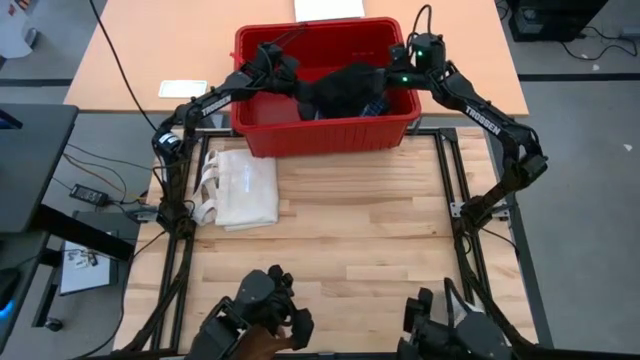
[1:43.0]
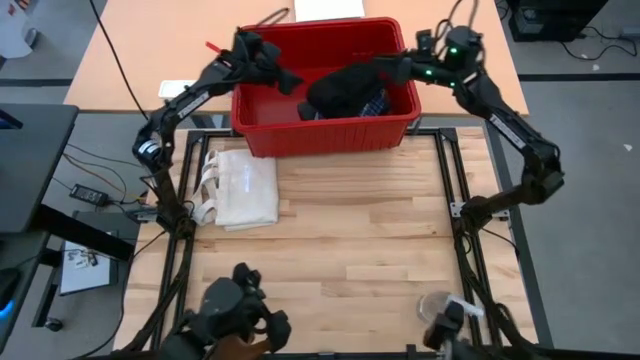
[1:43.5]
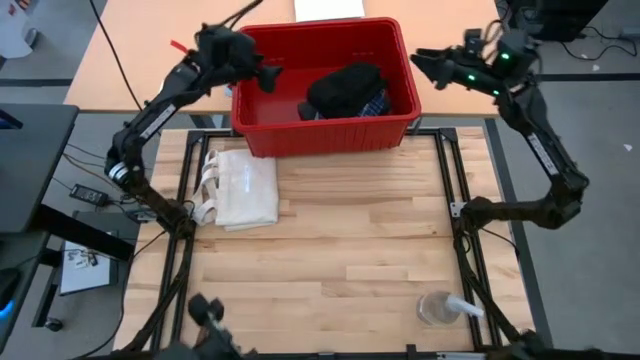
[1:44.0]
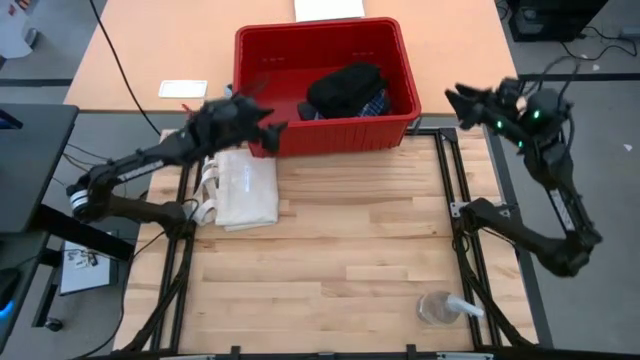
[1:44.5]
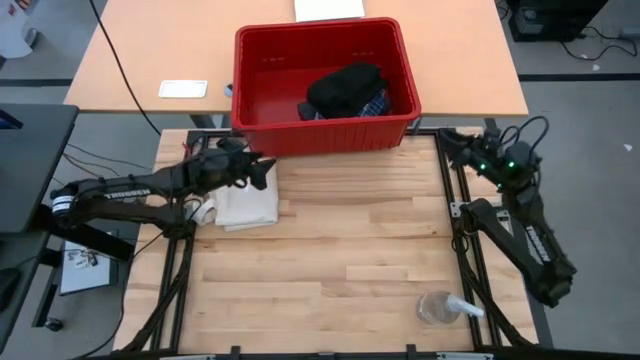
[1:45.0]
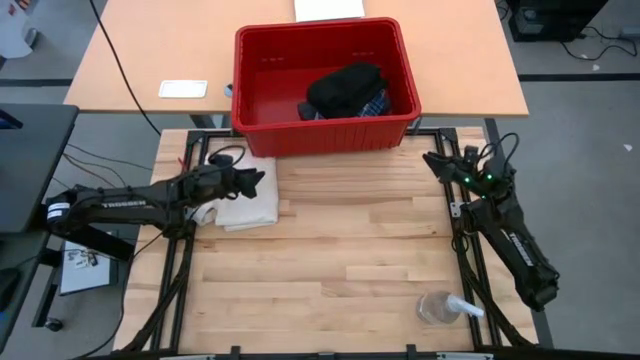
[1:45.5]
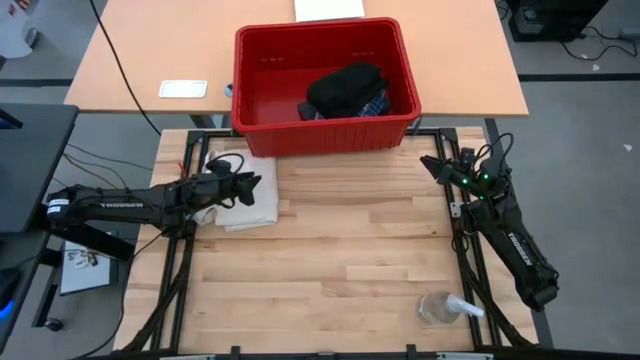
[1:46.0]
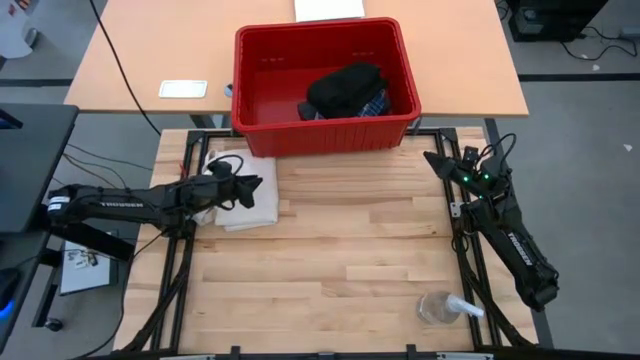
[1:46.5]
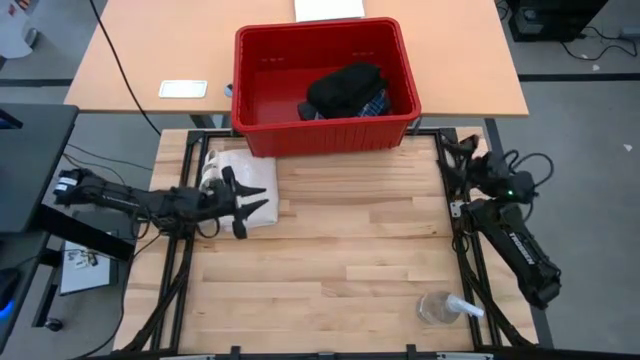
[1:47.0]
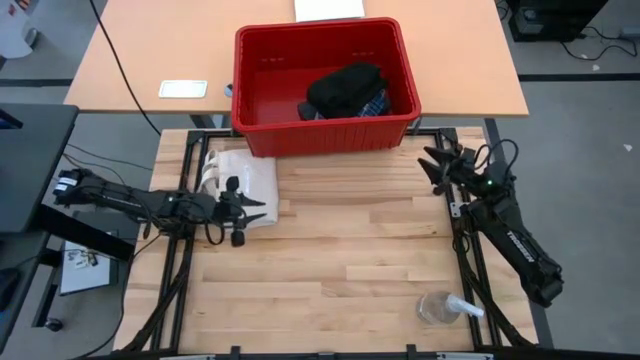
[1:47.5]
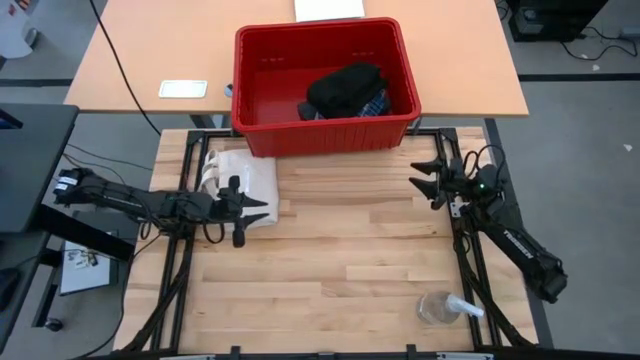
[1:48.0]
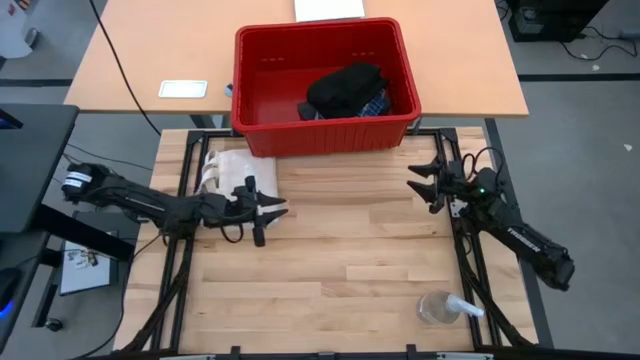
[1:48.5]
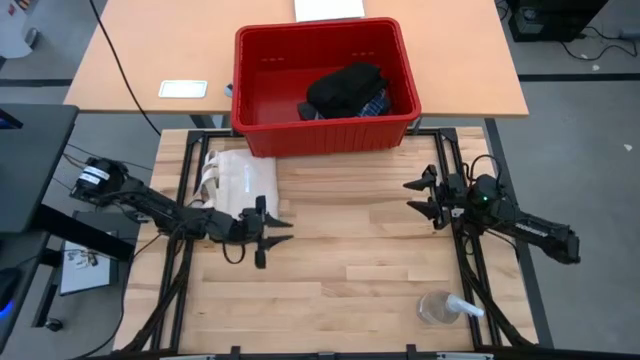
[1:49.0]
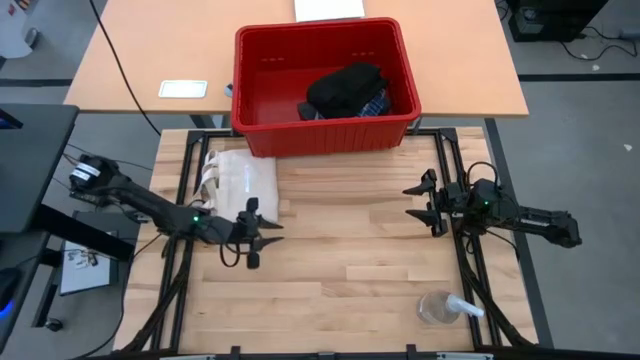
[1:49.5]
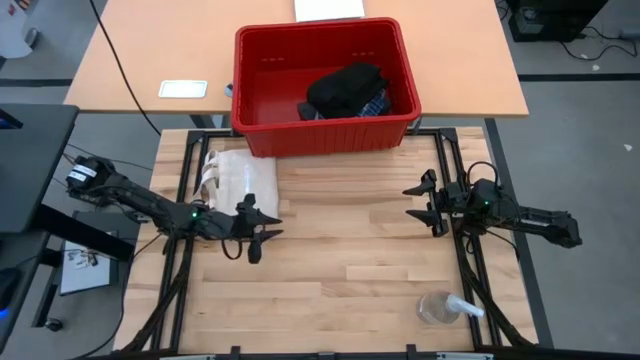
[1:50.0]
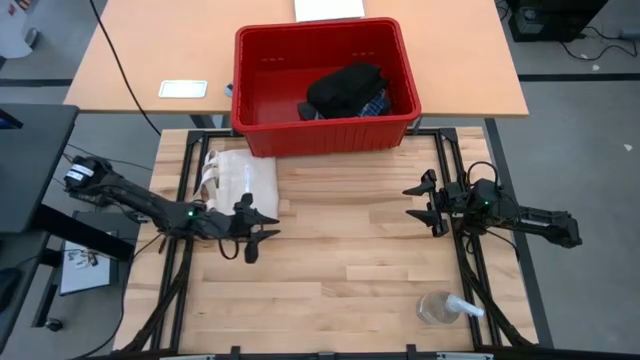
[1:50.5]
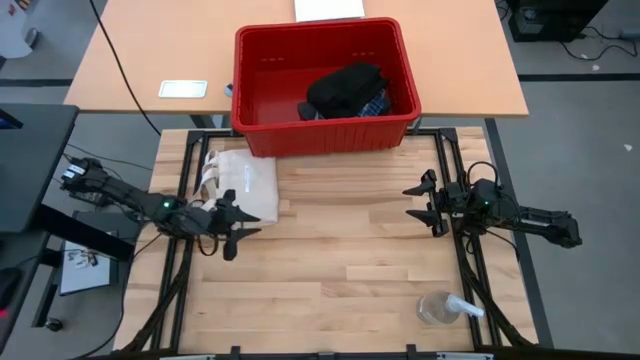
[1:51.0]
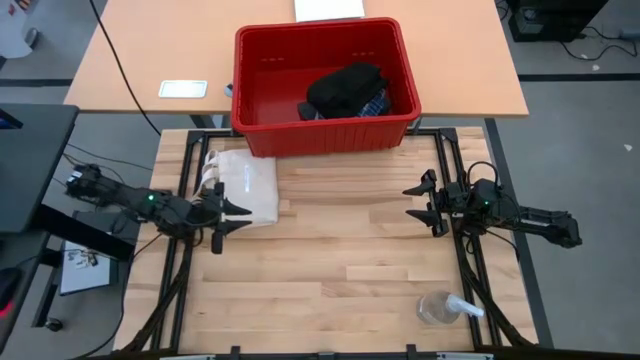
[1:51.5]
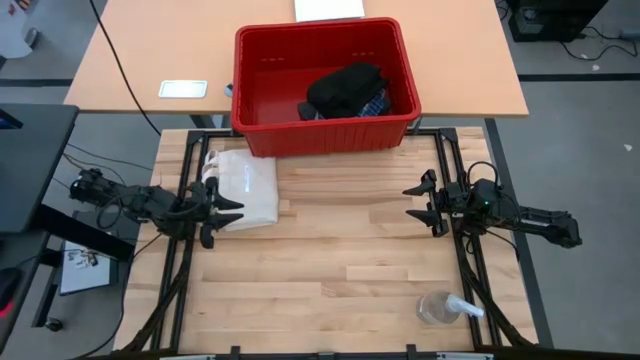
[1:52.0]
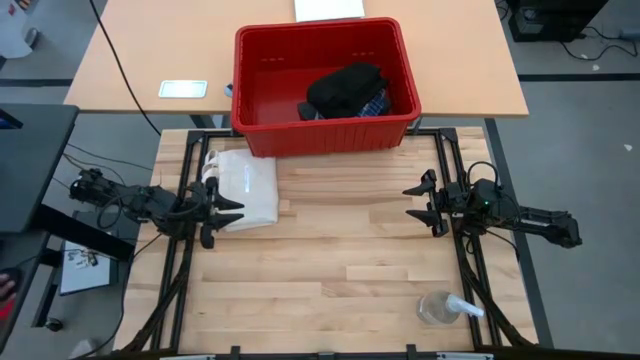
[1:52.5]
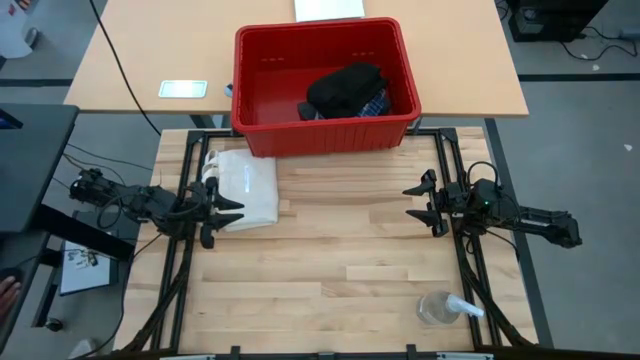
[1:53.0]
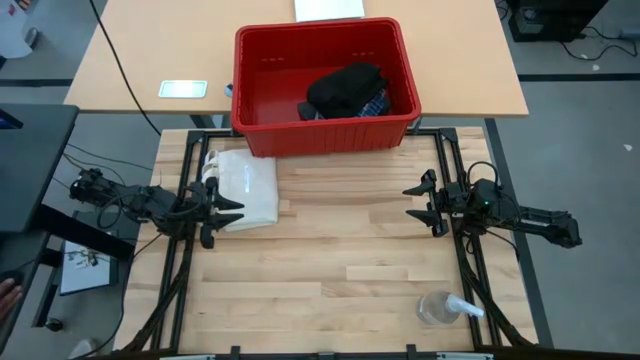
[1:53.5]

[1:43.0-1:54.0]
Task: Fold laundry
Return to Home Position

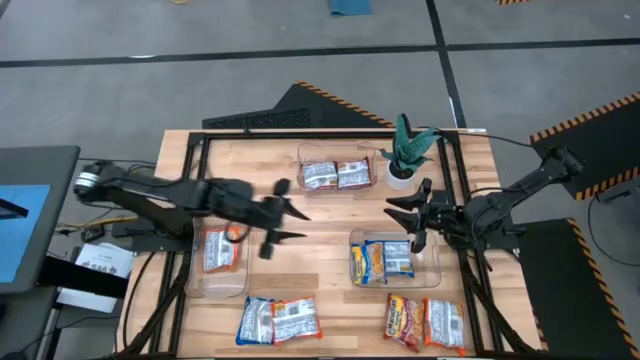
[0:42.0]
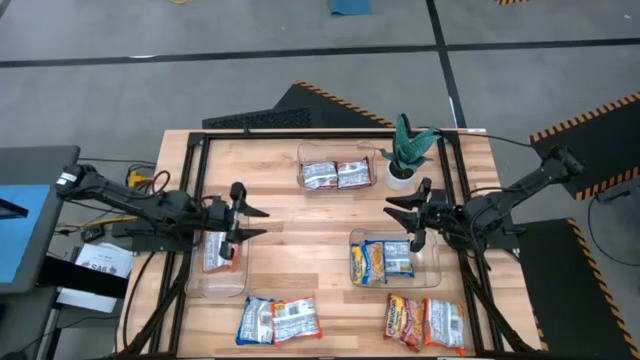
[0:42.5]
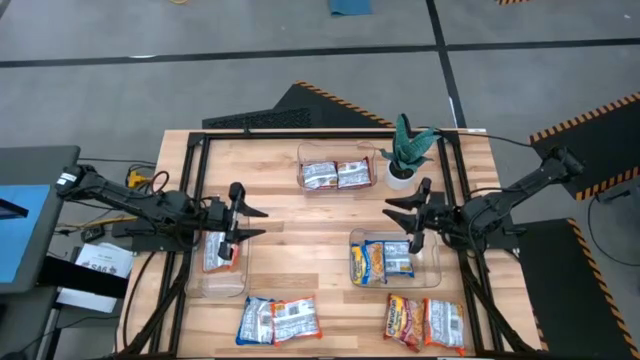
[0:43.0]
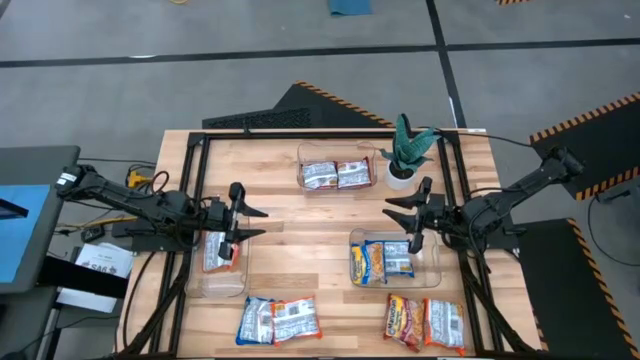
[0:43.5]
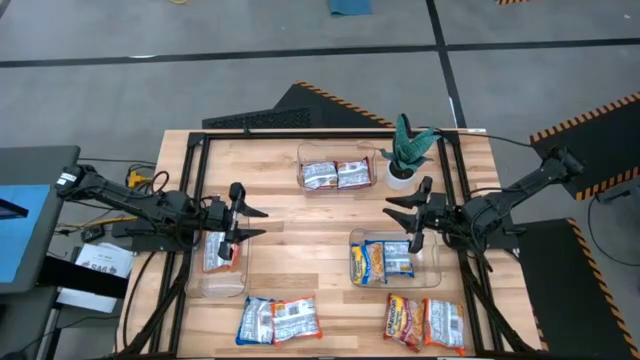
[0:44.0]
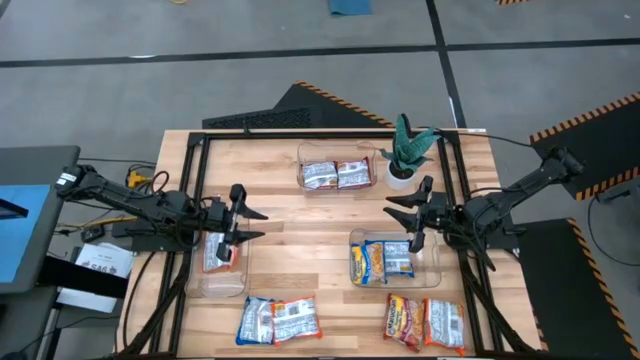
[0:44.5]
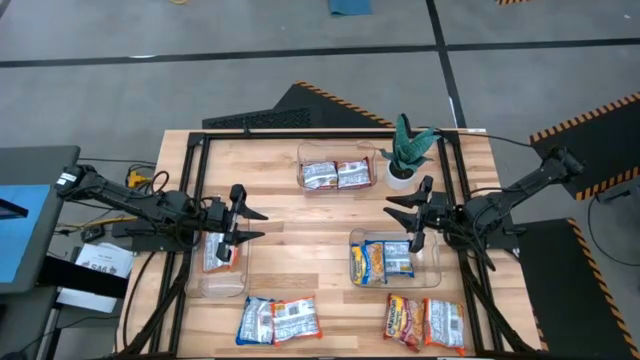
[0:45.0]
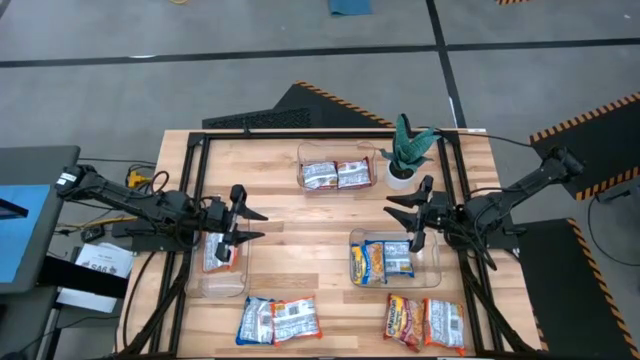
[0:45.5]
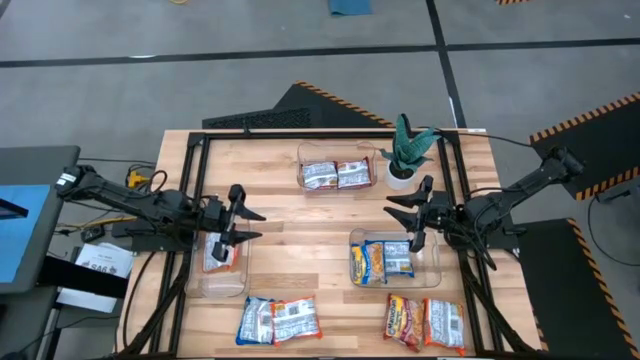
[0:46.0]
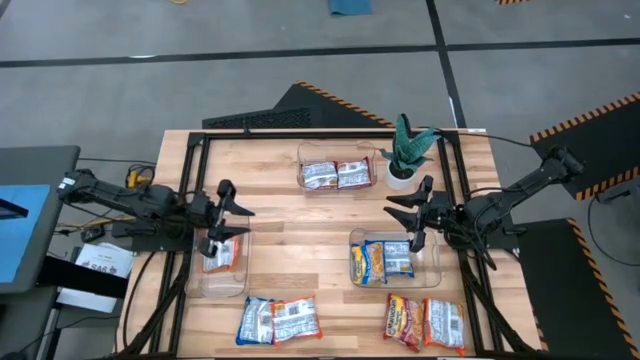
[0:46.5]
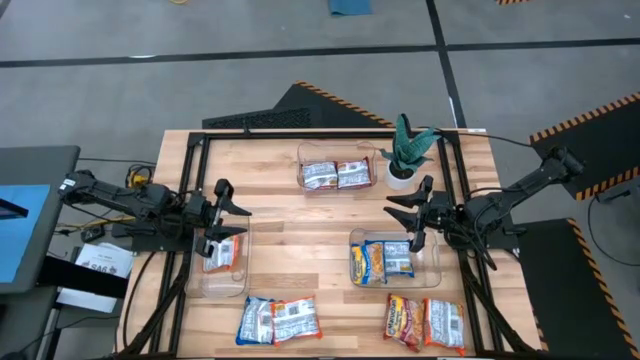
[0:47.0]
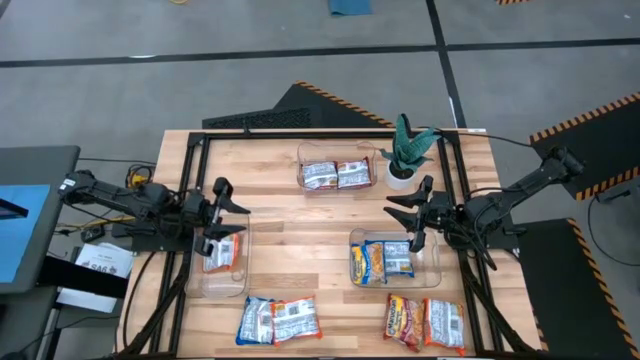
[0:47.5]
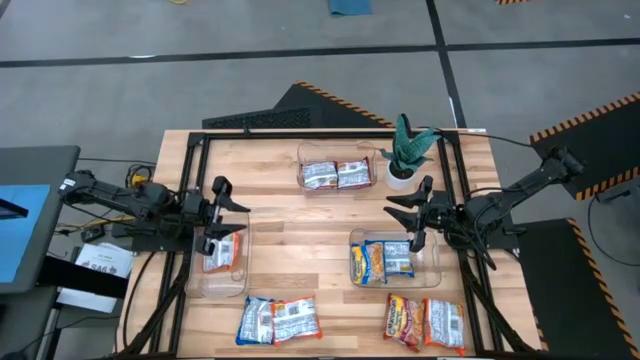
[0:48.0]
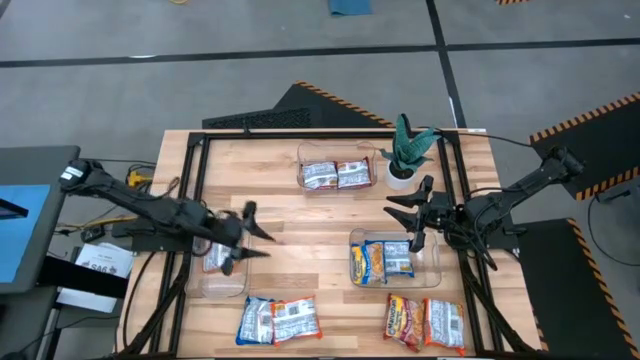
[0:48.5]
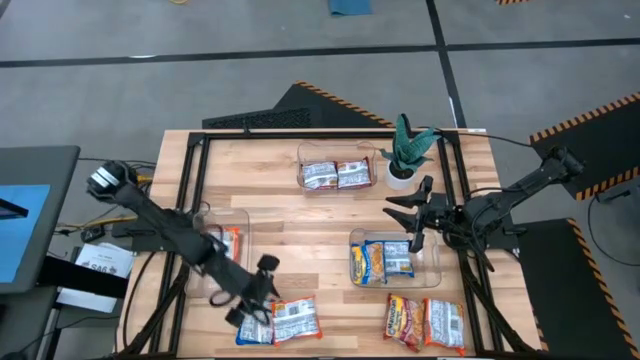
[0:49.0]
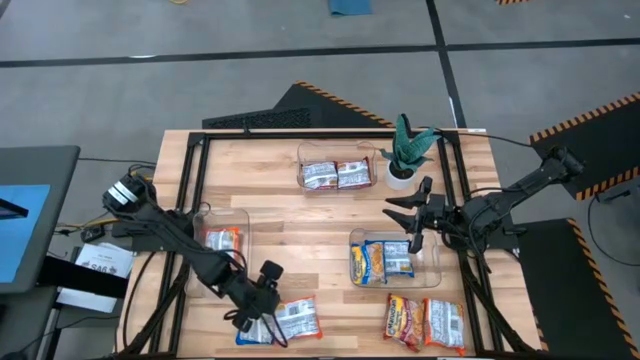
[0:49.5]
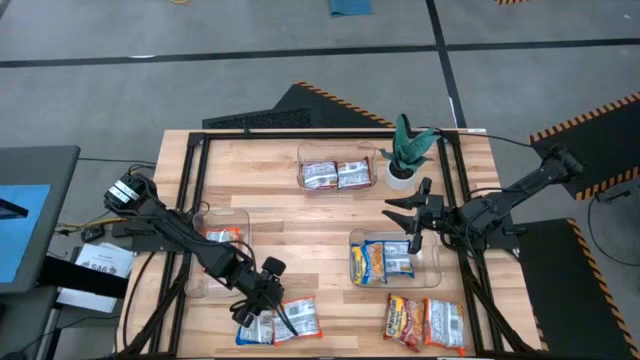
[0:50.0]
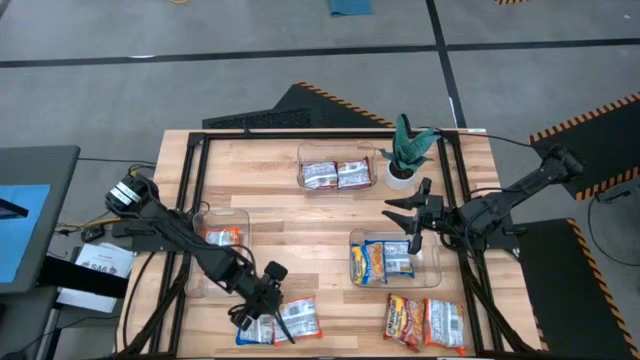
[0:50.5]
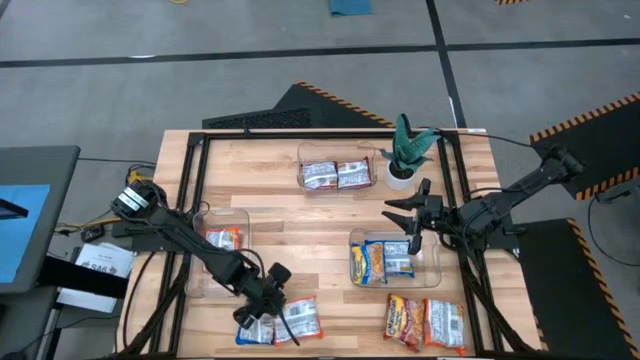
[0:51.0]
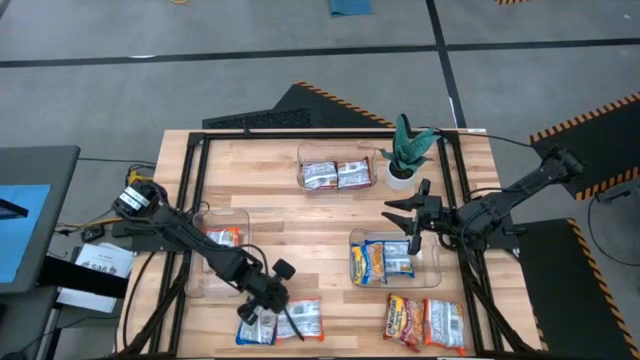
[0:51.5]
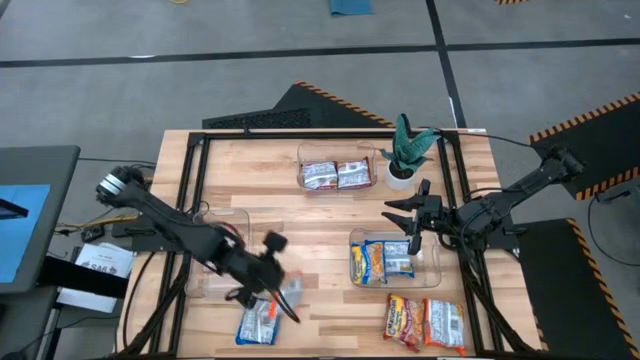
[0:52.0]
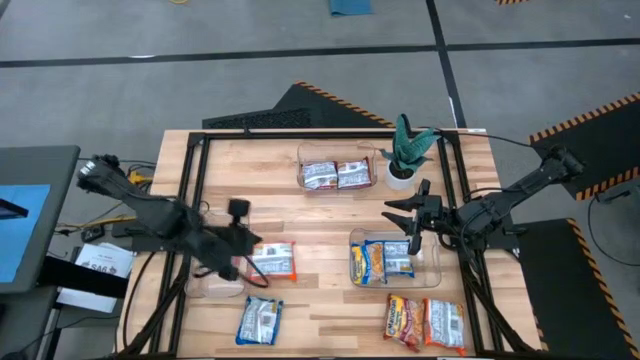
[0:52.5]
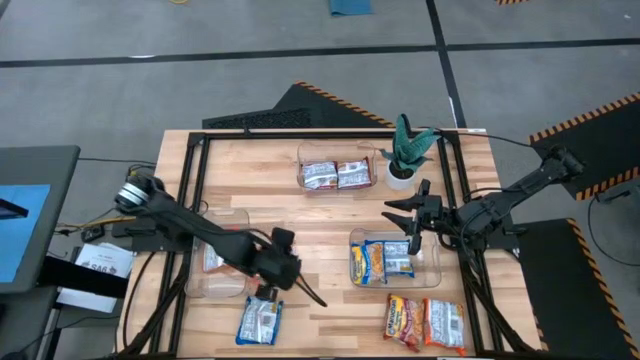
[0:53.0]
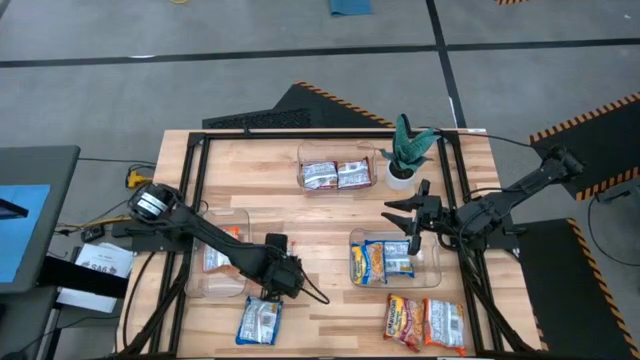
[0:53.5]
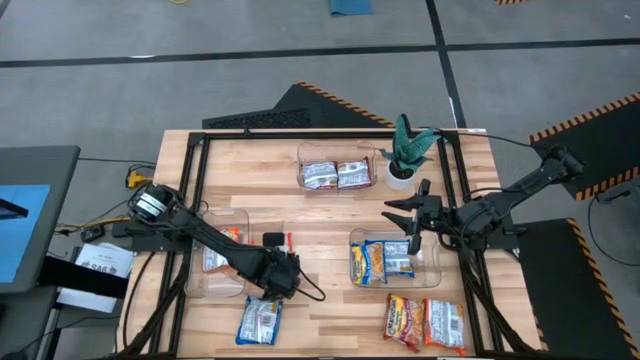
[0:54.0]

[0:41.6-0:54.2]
Task: Sort Maruchan noodles
Put the left orange bag into the bottom left transparent bin
